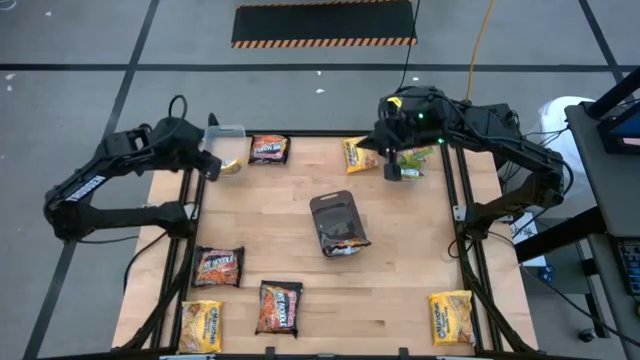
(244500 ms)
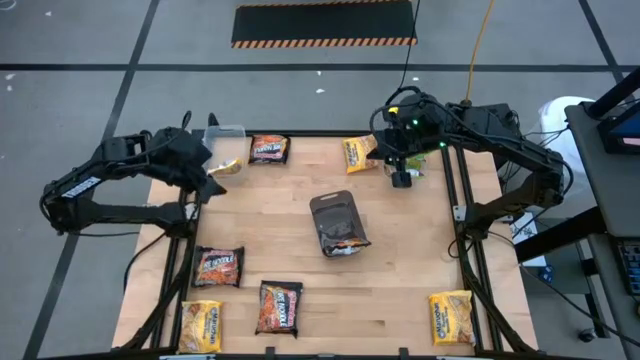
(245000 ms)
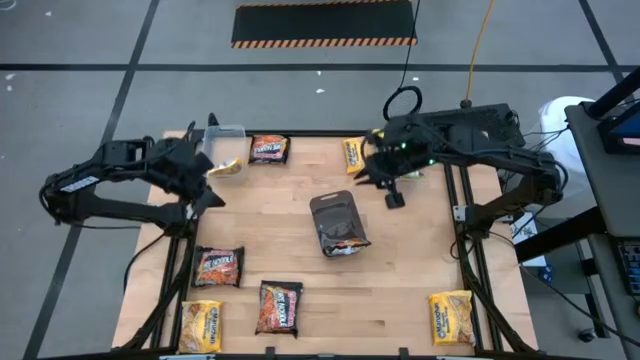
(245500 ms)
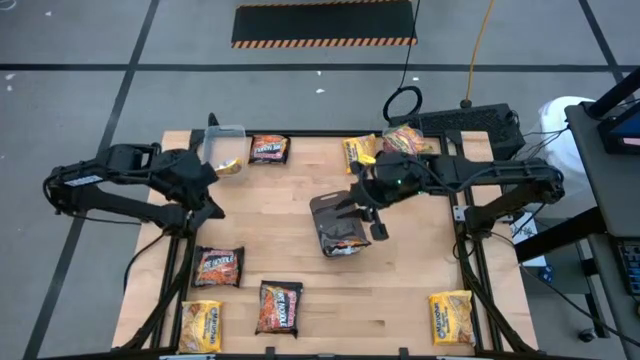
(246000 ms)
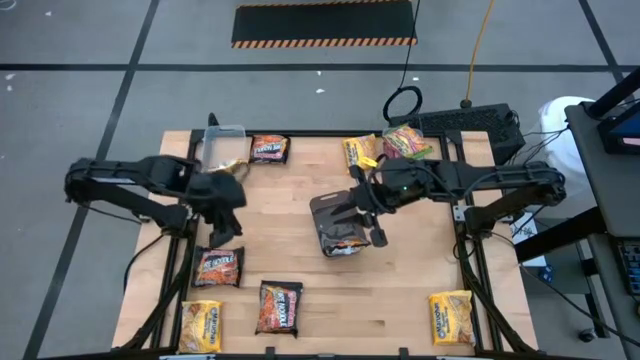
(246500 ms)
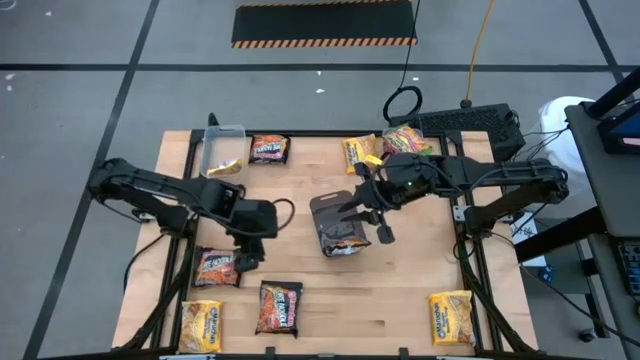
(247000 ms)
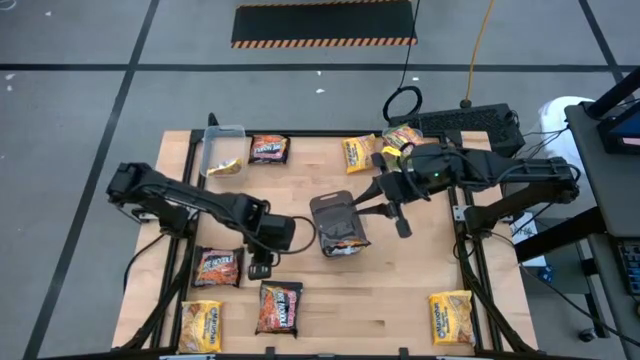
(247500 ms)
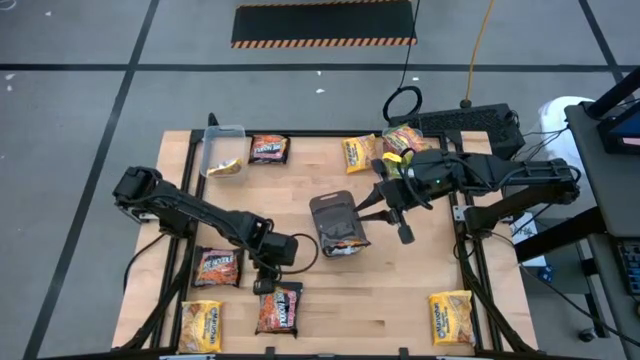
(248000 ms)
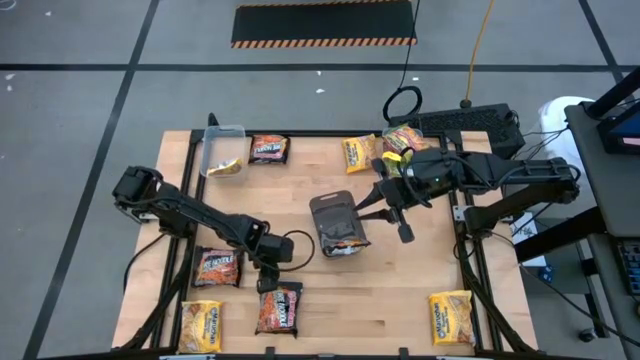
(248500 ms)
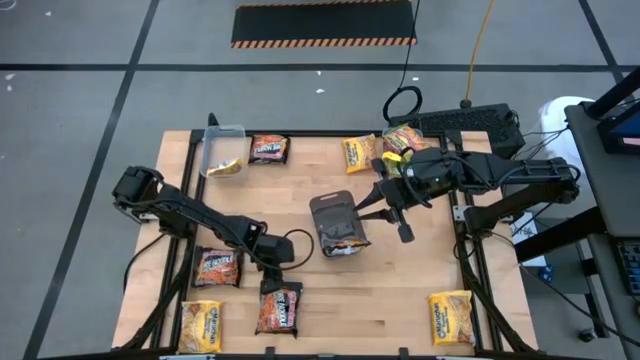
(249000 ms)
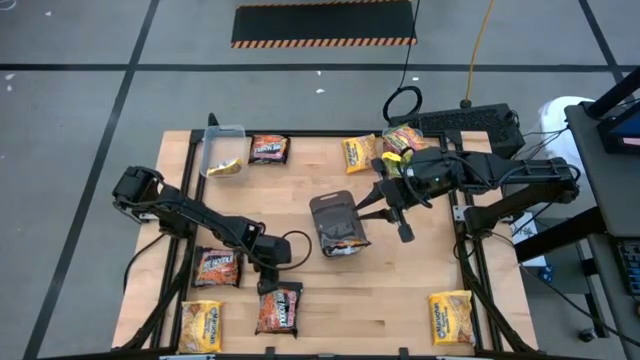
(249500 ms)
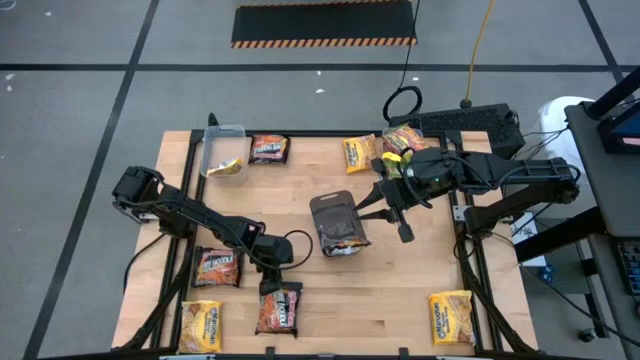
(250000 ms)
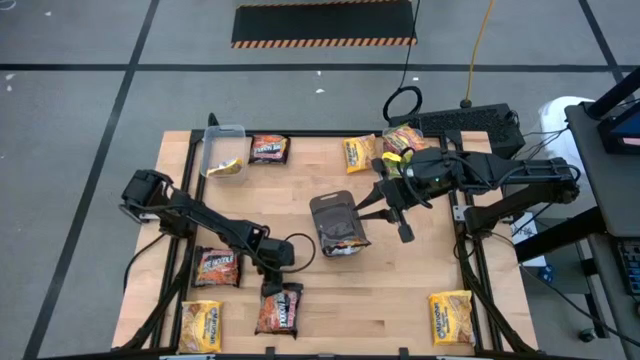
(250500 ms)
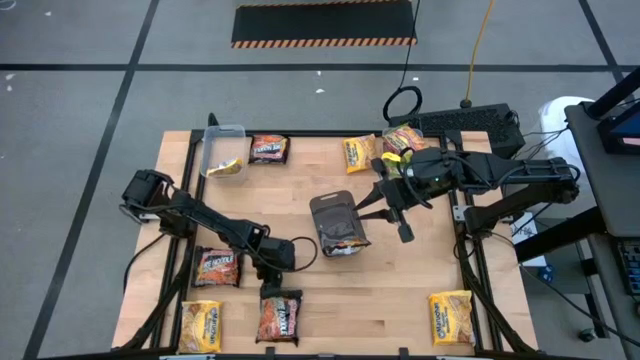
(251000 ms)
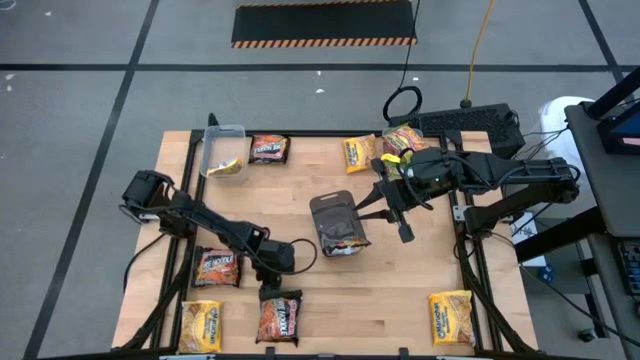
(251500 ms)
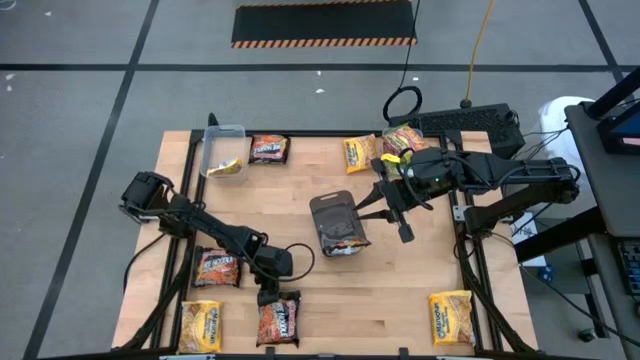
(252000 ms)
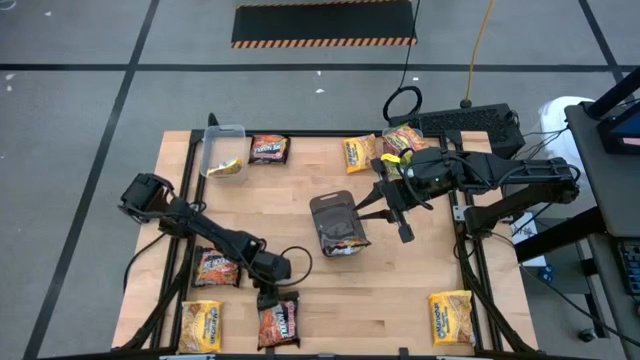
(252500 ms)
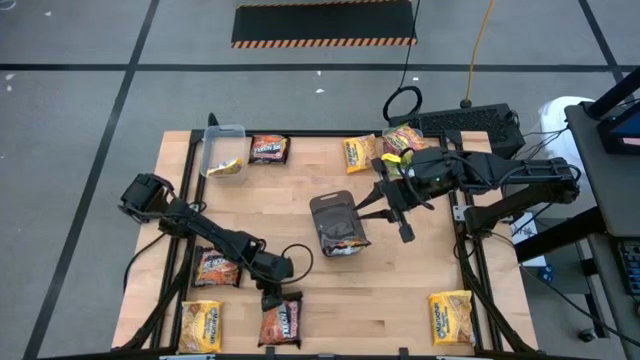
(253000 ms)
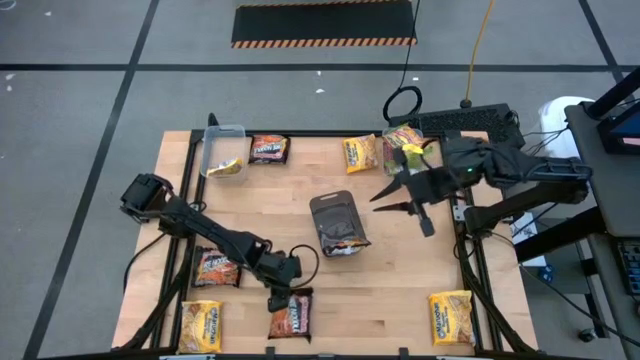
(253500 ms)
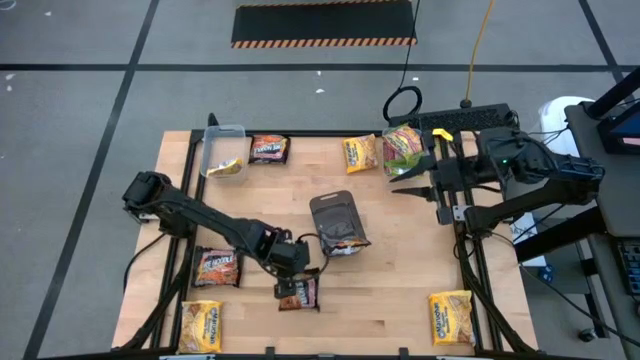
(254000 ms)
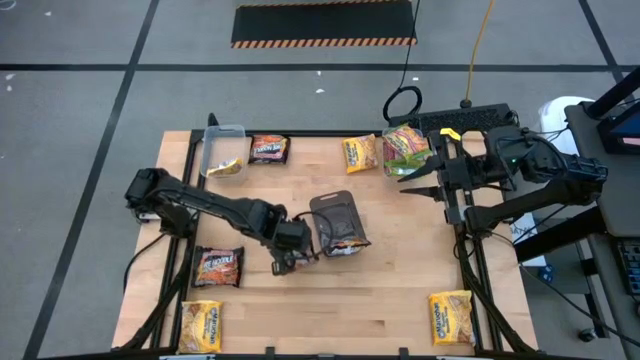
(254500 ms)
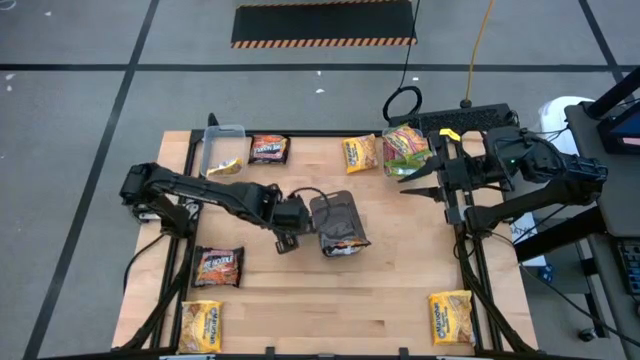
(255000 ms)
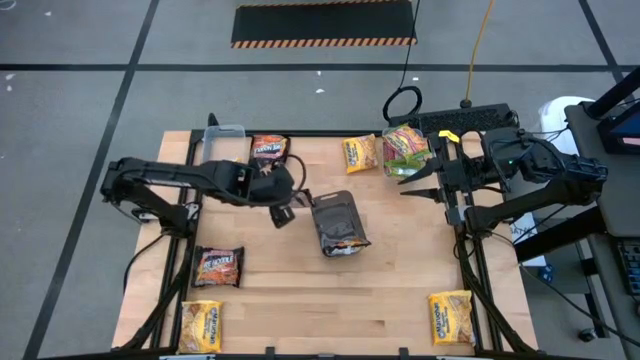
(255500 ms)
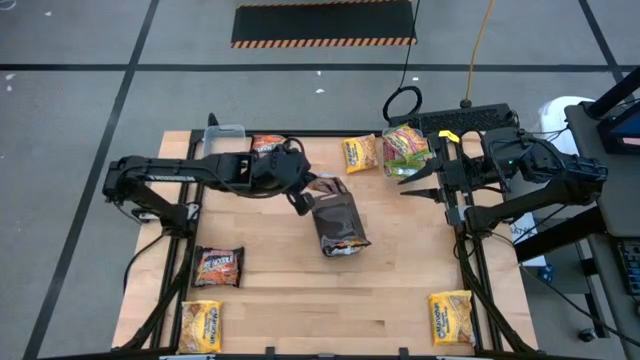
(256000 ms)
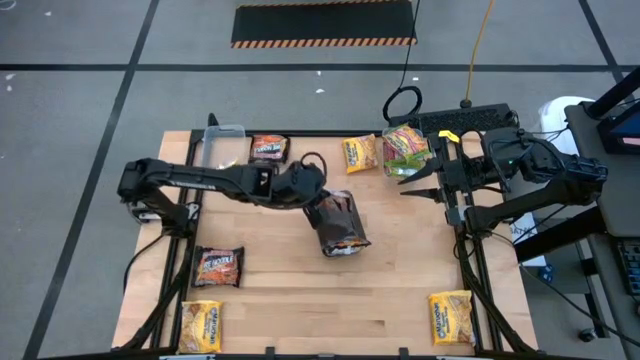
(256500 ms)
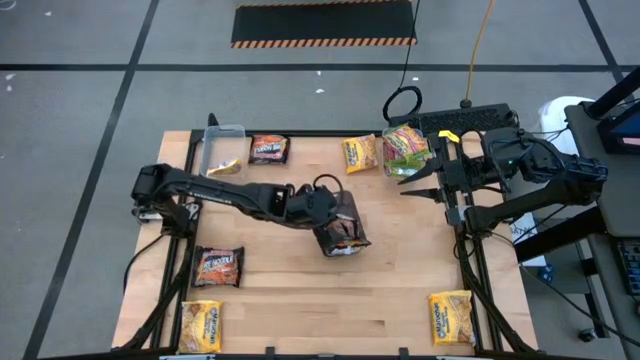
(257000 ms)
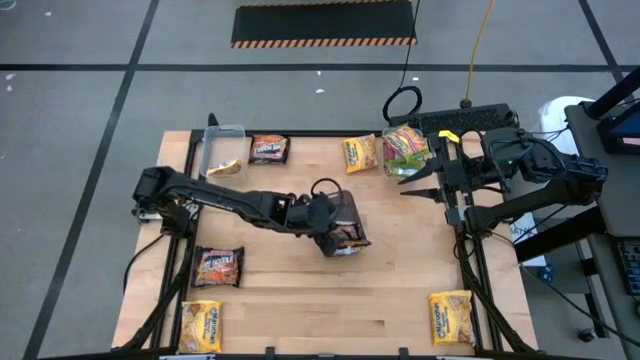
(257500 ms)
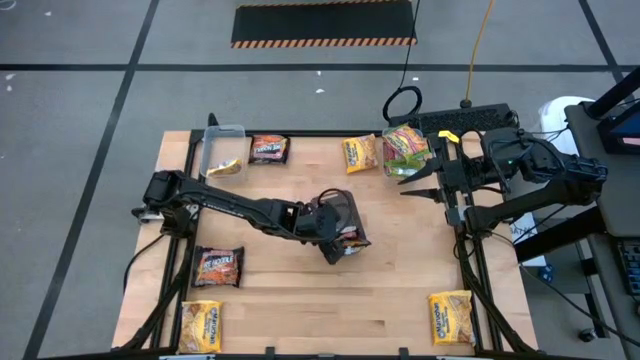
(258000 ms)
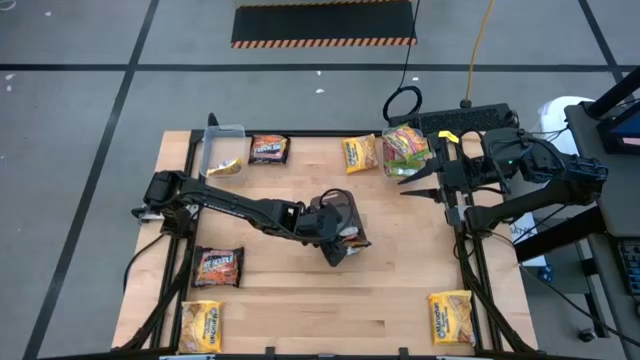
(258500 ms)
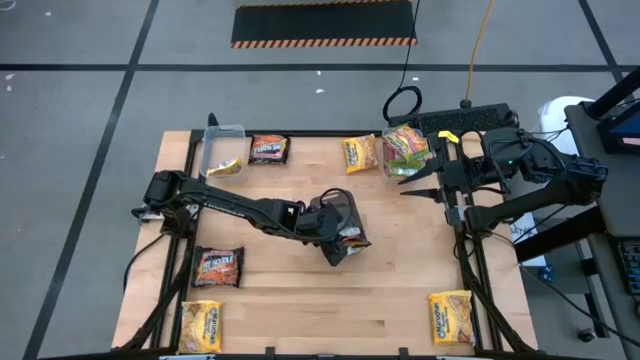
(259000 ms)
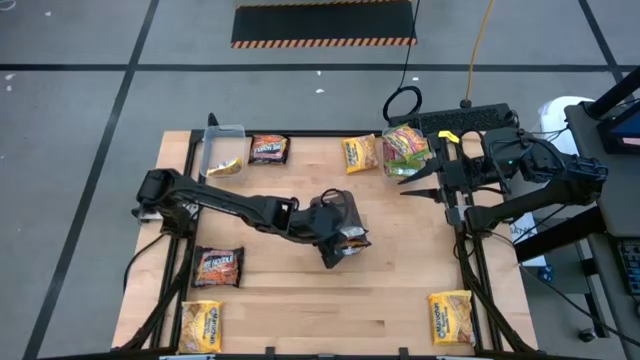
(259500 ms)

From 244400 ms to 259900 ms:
Task: Sort Maruchan noodles
Put the bottom black noodle pack into the black bin

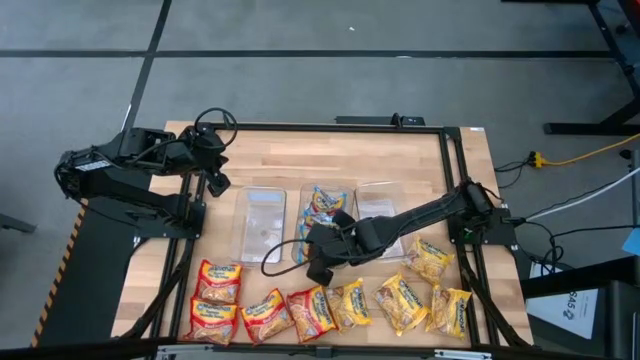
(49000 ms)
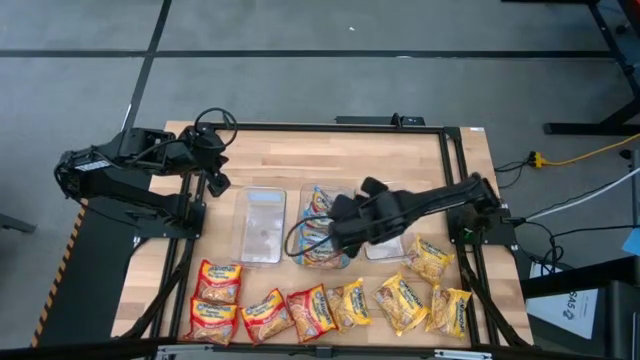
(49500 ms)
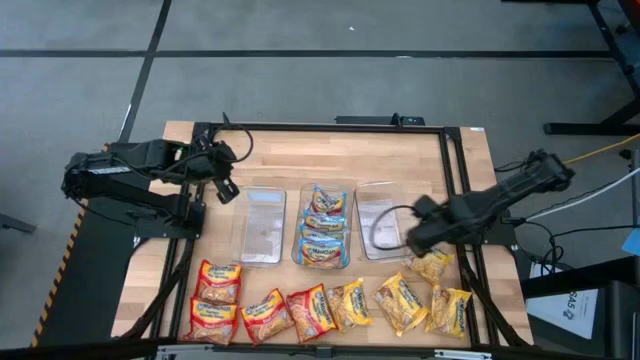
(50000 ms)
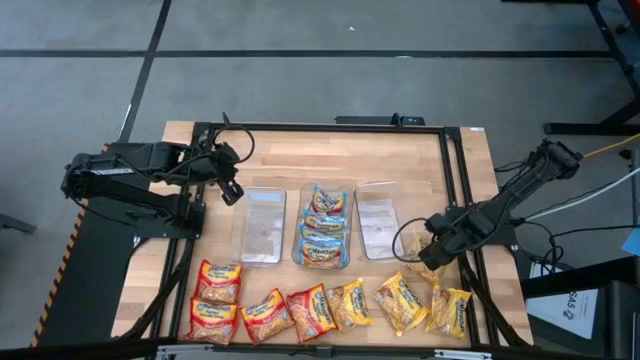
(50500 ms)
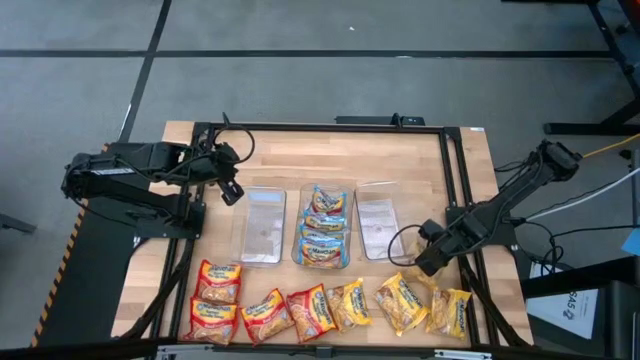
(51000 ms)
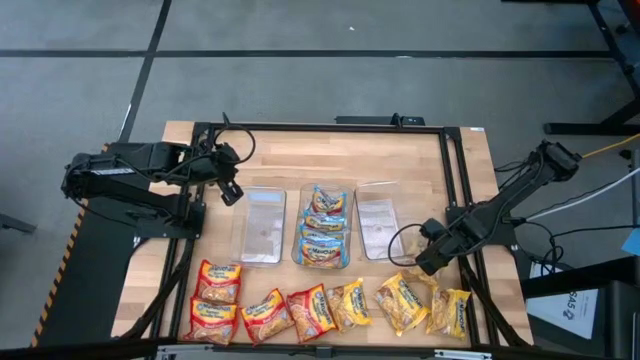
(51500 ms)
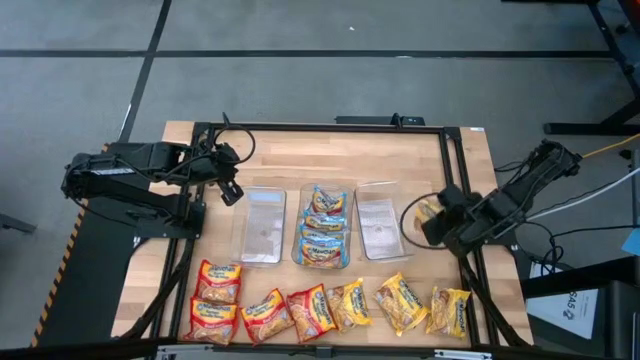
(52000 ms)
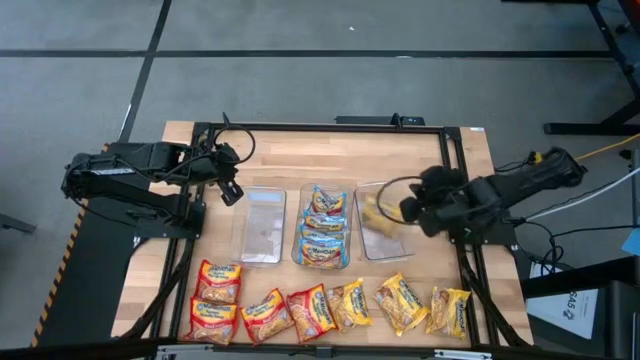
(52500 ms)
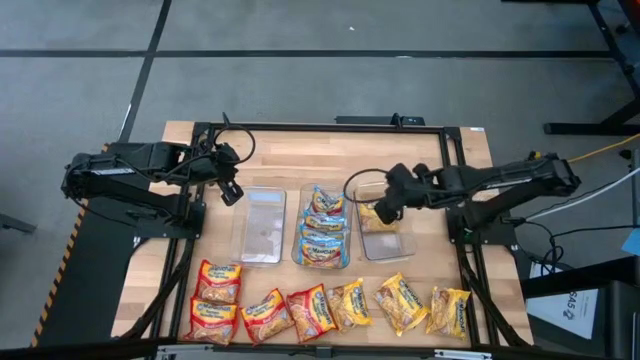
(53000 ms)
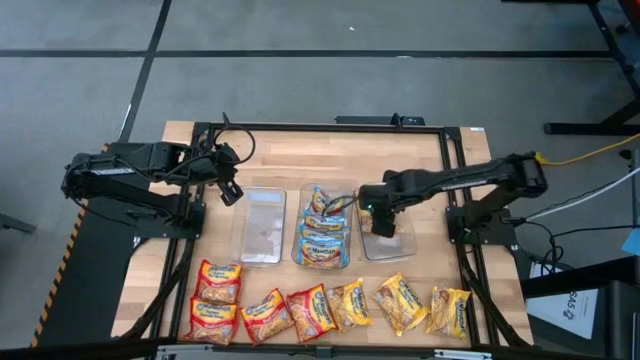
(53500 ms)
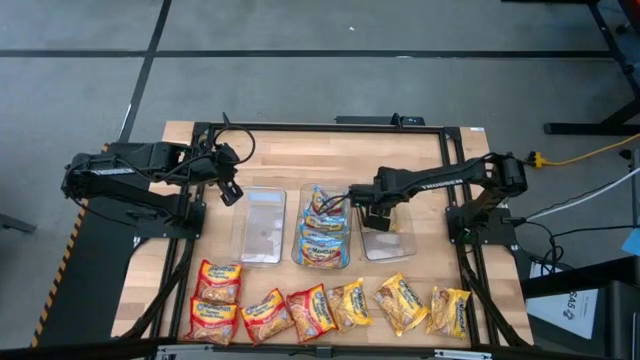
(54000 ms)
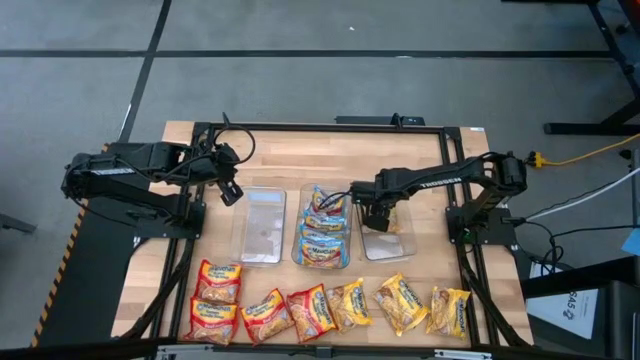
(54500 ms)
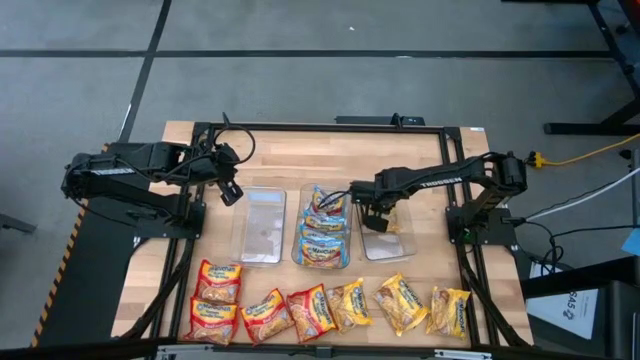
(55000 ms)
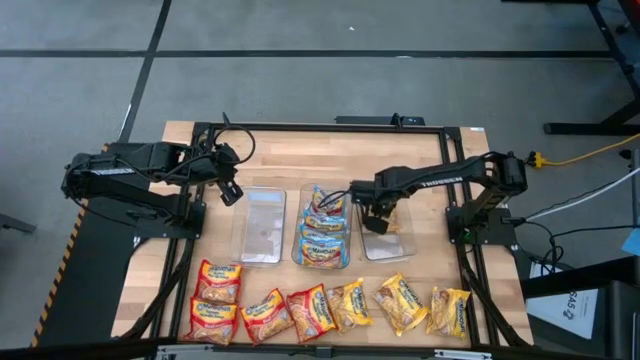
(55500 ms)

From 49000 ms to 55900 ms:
Task: Sort Maruchan noodles
Put the yellow noodle pack into the right transparent bin
